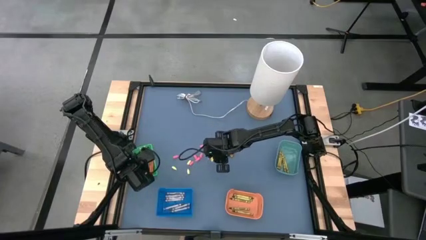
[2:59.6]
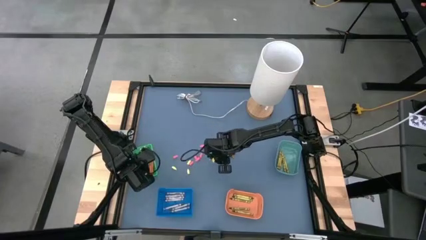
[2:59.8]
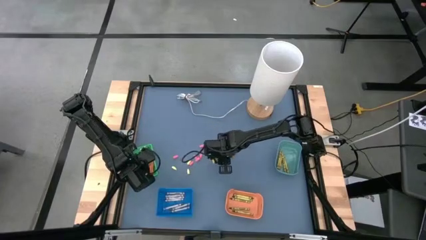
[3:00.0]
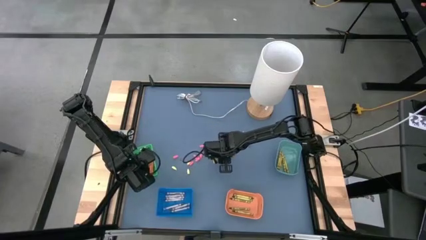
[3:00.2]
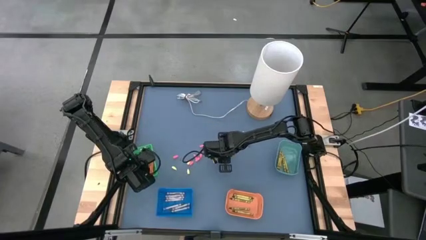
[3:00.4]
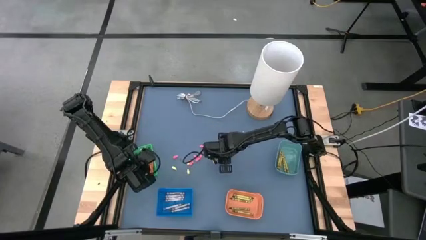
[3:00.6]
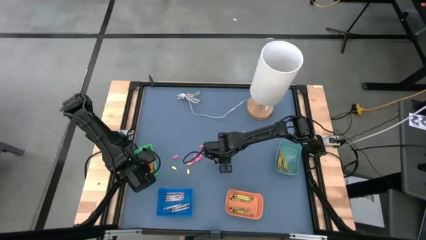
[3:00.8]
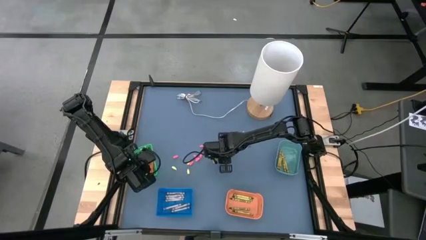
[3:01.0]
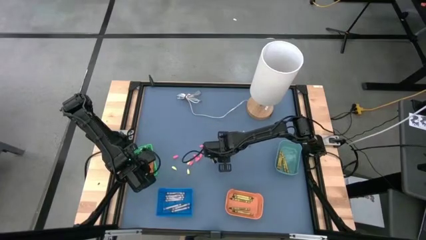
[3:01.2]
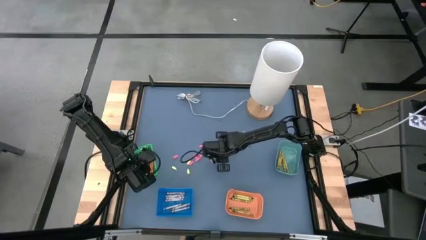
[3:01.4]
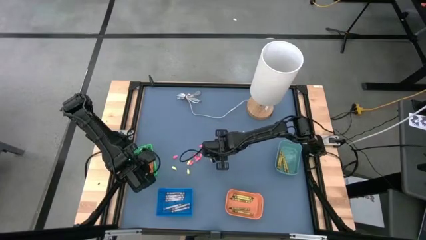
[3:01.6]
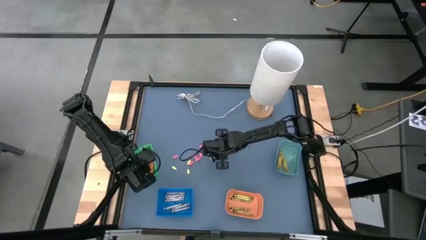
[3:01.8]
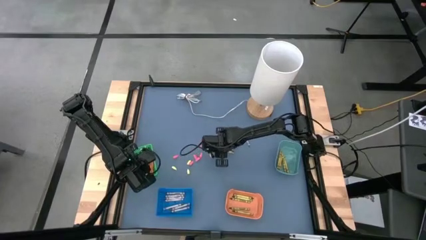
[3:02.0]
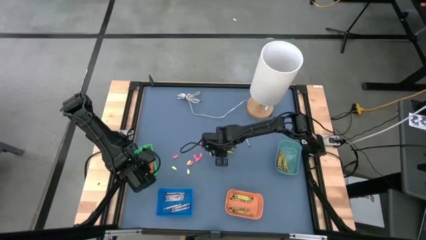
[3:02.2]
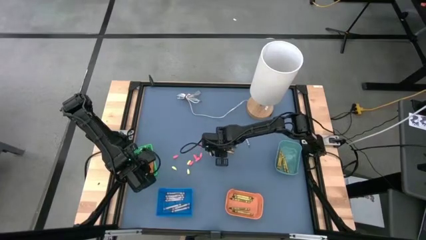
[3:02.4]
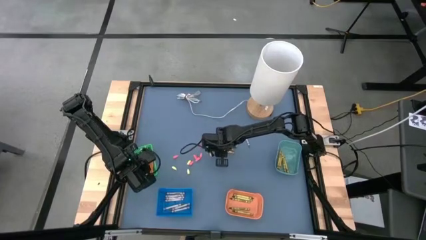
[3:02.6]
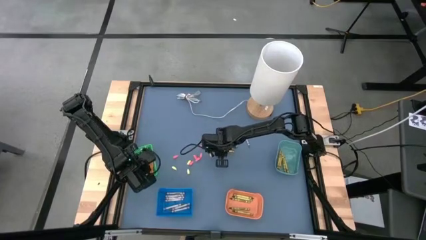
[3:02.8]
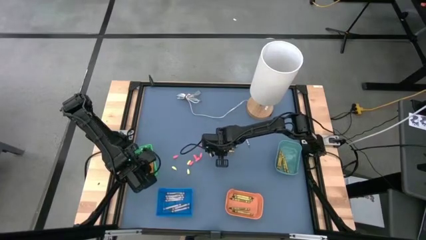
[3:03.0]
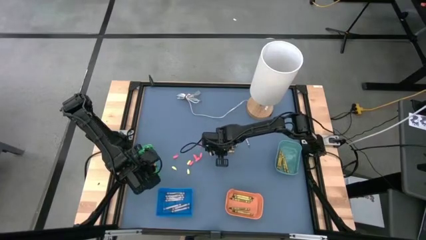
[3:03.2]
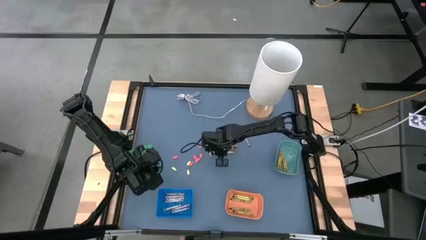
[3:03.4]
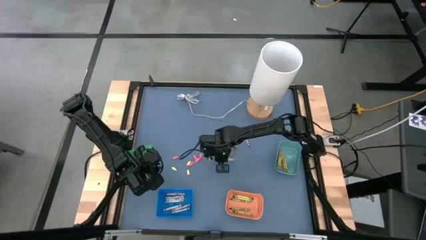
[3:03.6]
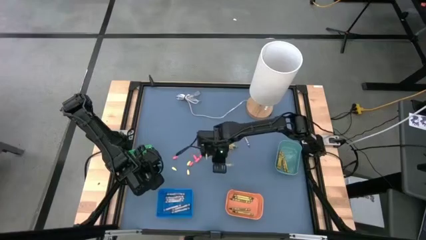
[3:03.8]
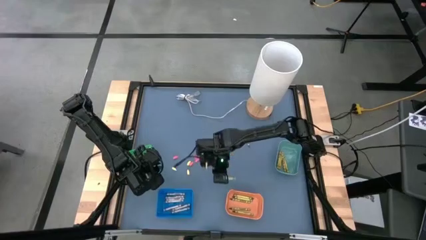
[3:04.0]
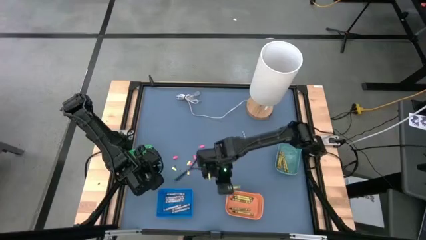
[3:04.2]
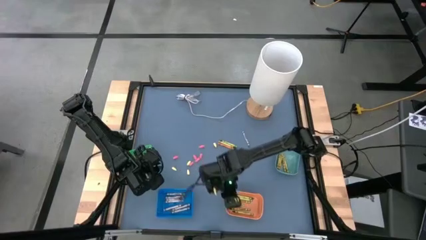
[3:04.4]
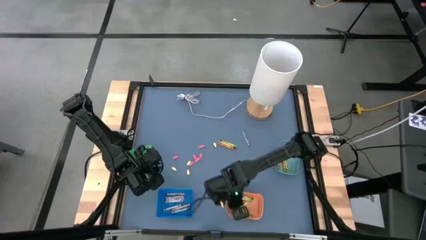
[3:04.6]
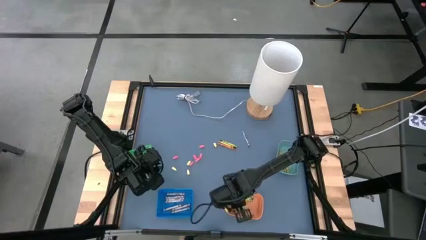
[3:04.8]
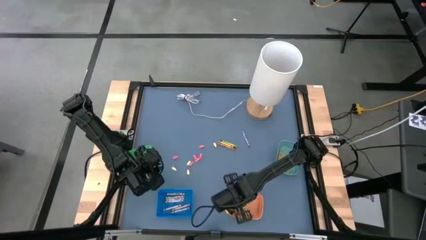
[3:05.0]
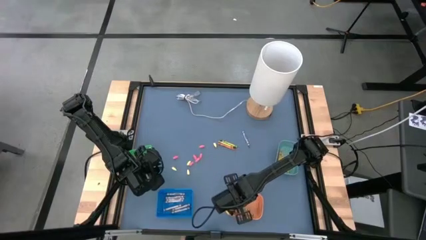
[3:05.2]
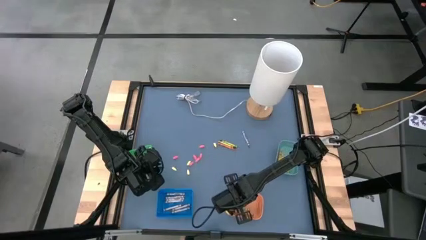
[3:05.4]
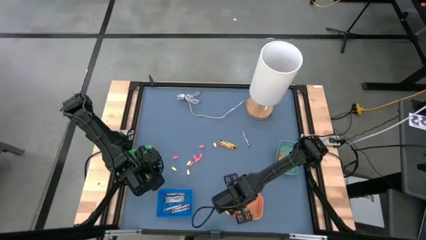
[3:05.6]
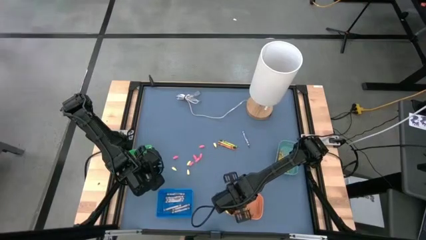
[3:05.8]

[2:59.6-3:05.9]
Task: Sort crayons
Put the green crayon into the orange bin

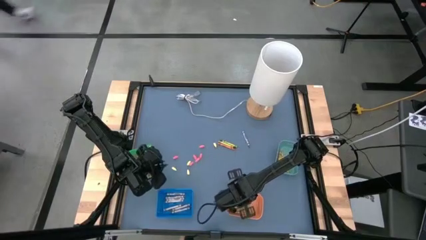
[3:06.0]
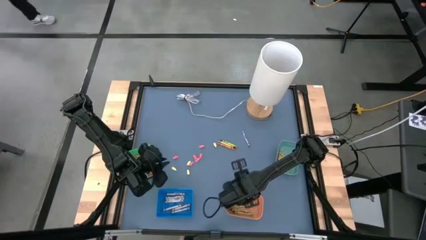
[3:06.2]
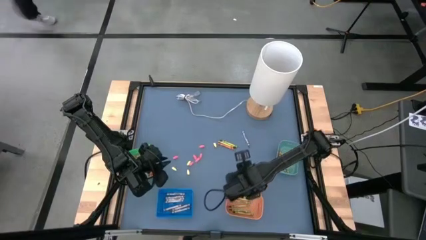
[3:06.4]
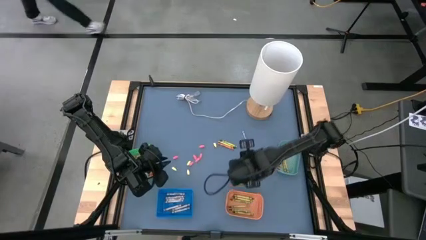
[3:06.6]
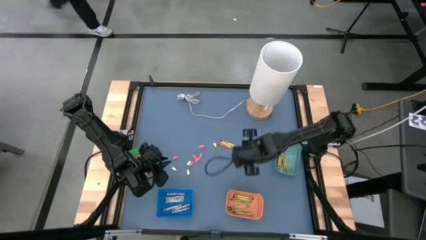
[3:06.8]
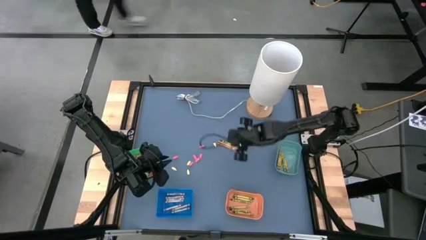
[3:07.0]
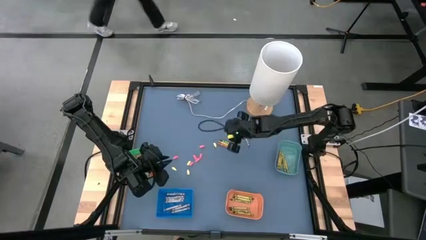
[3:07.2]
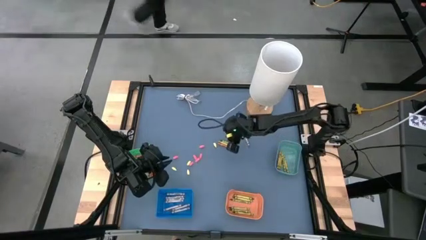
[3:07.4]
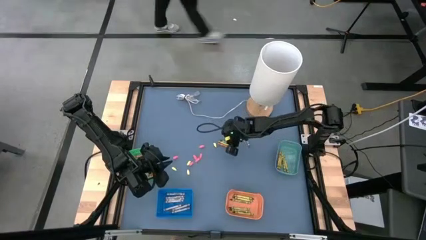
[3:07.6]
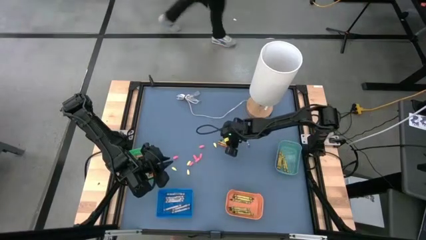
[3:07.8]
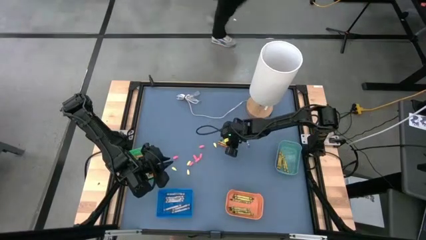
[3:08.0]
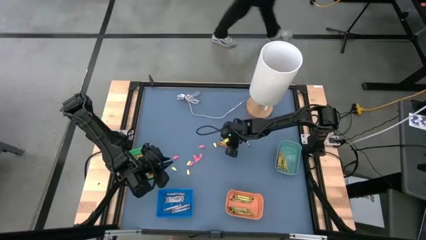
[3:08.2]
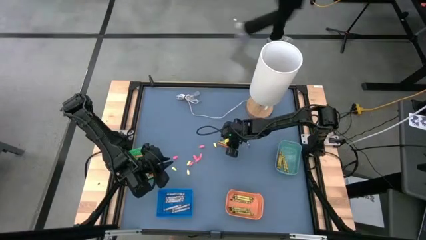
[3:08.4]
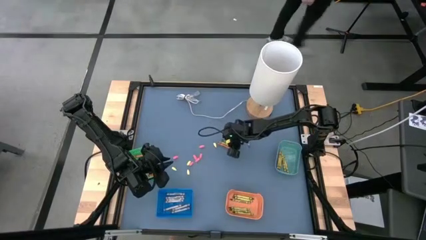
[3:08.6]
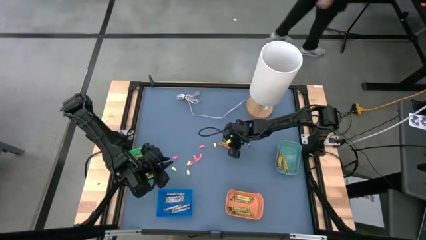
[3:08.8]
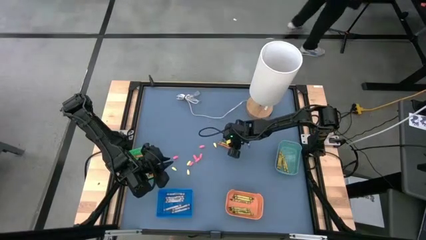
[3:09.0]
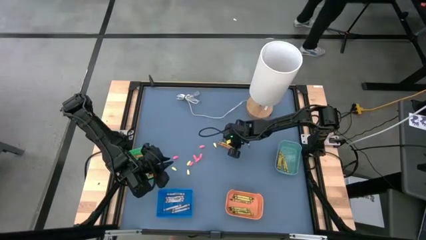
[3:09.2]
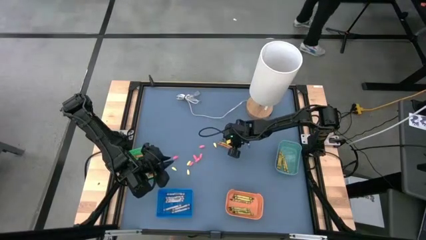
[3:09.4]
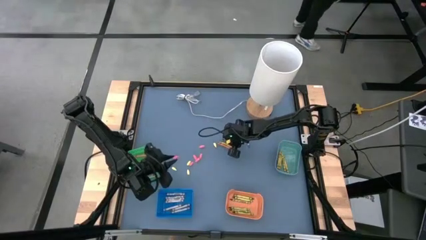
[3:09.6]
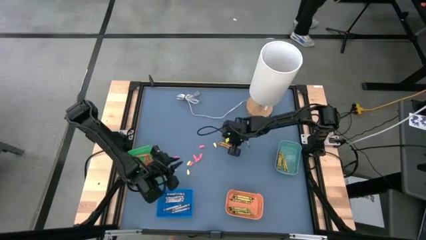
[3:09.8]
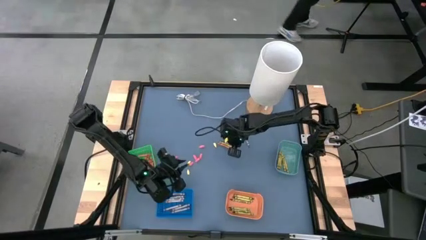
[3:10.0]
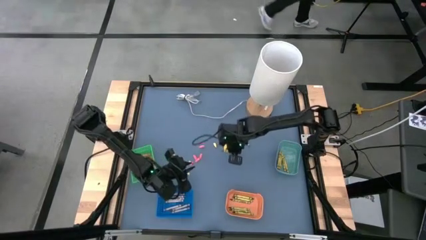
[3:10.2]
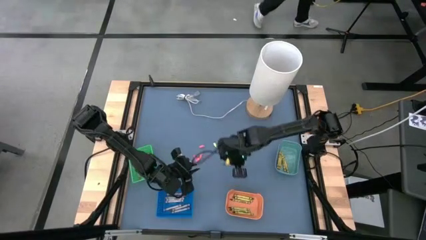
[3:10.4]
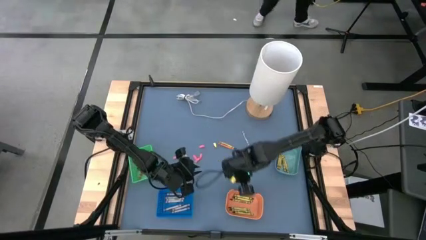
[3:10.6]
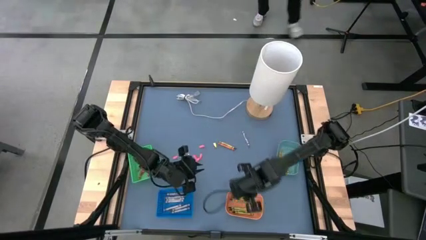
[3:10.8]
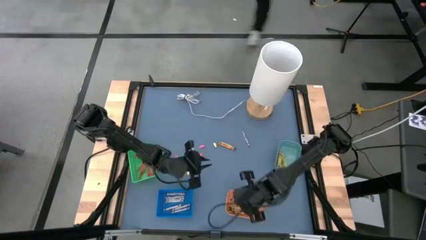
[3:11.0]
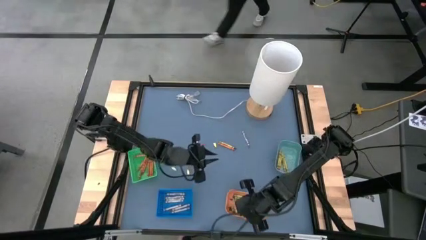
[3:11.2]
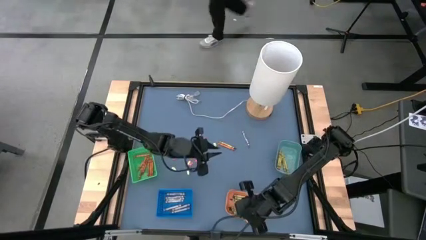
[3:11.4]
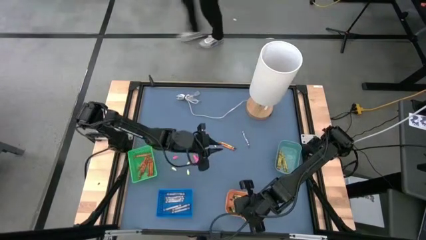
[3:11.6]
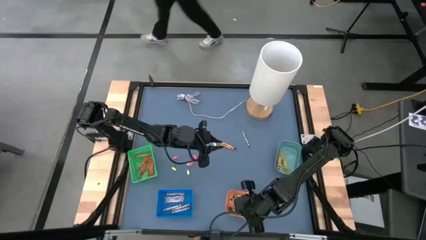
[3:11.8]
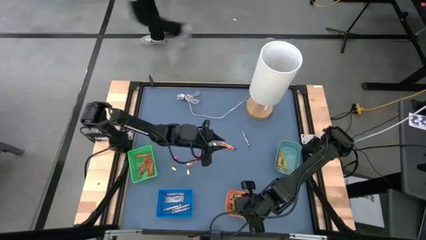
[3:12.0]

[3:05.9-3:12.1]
Put the green crayon into the orange bin

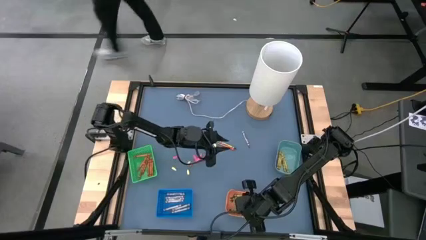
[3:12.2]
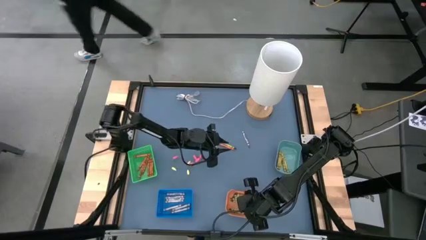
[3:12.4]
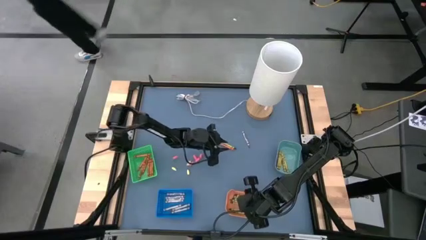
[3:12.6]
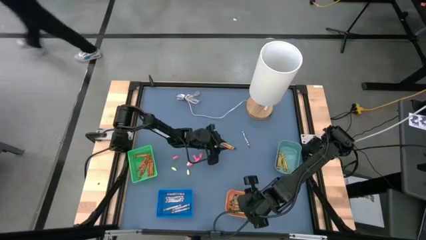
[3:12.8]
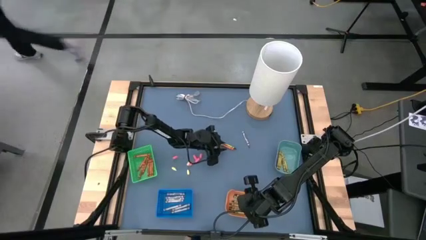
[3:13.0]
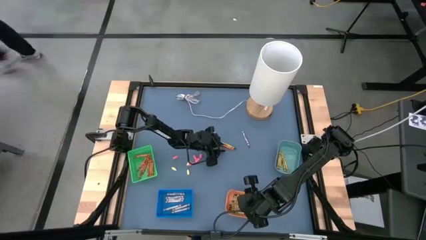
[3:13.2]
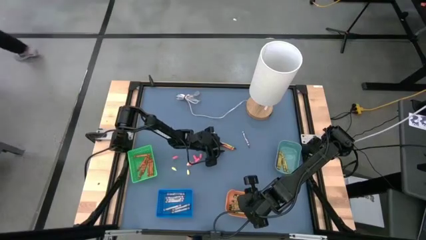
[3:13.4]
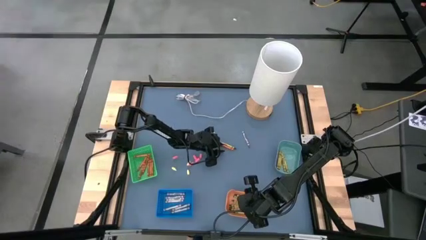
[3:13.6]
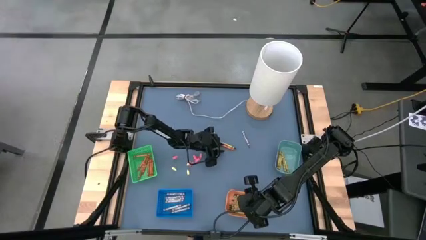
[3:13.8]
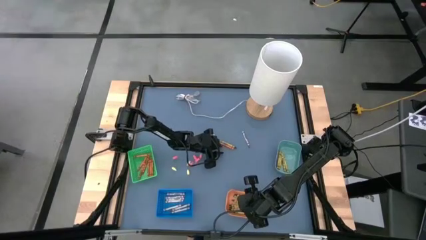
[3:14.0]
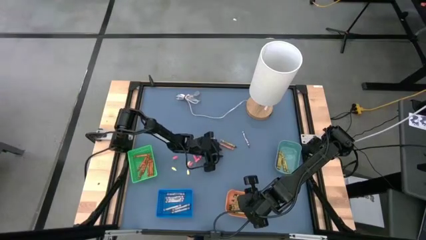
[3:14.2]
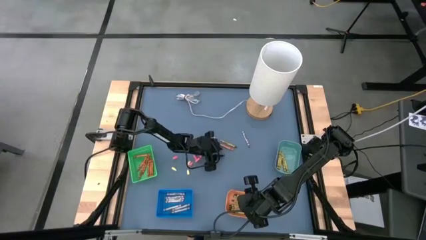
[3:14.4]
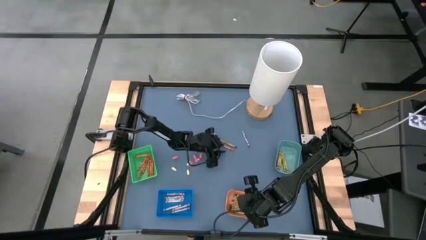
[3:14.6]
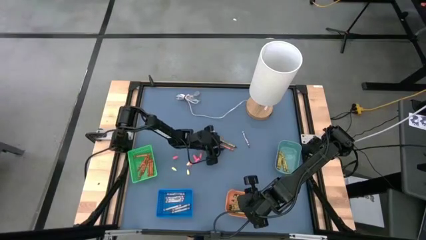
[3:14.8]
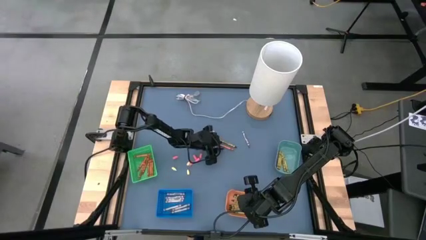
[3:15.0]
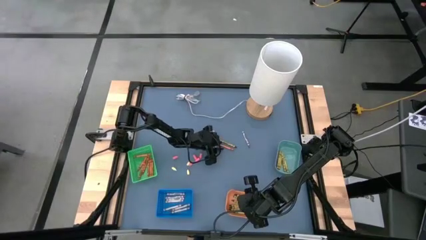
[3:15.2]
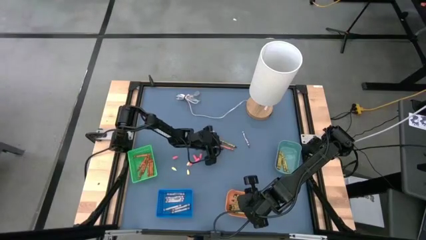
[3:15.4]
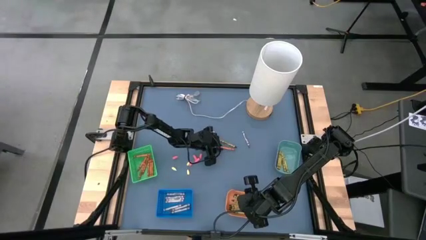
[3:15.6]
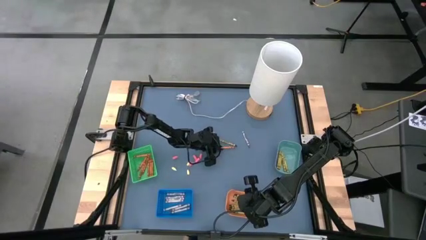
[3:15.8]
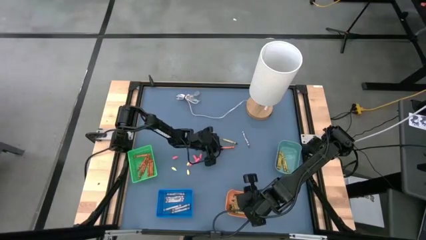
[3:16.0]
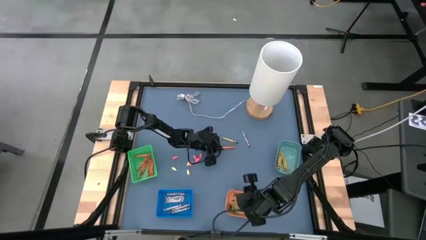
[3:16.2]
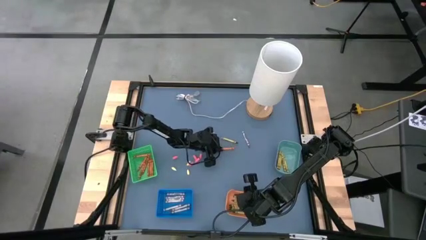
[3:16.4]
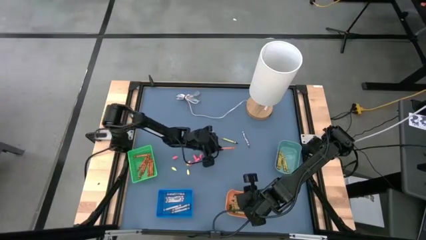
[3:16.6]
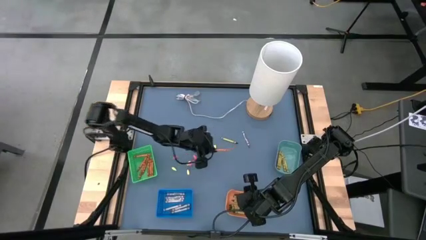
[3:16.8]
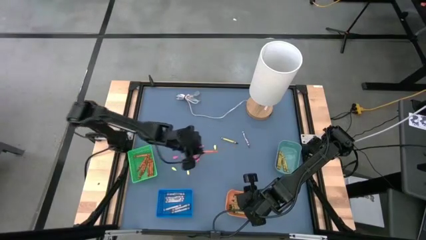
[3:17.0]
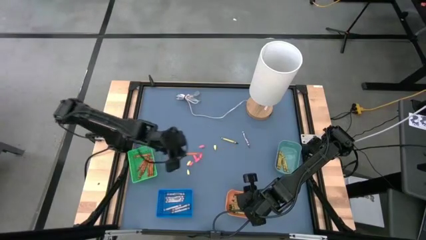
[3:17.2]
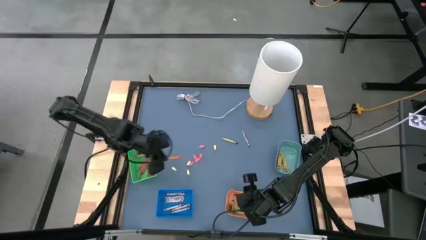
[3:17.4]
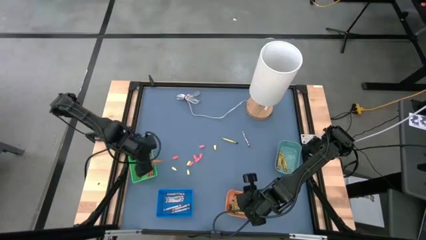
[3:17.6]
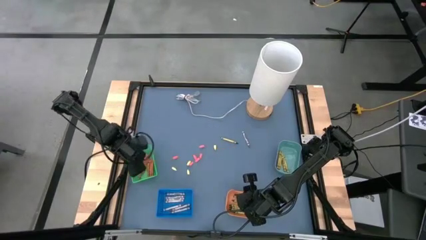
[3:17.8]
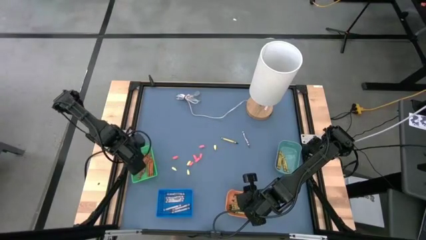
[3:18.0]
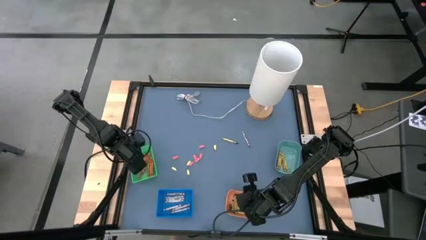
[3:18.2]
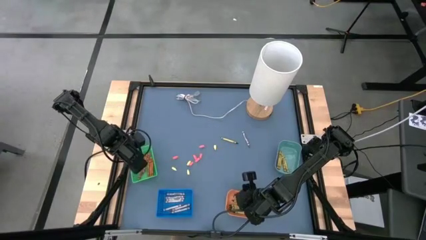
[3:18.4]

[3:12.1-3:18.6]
Put the orange crayon into the green bin
